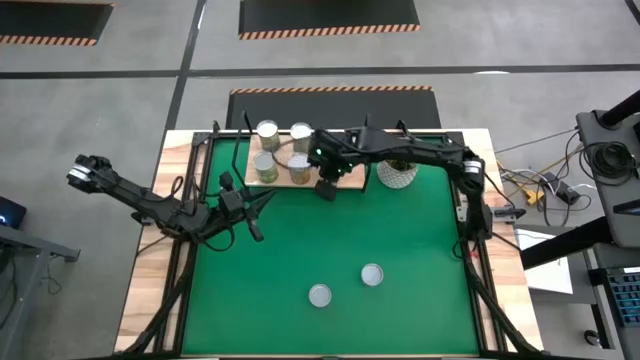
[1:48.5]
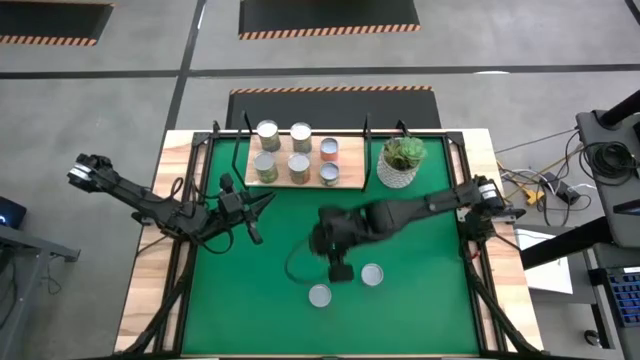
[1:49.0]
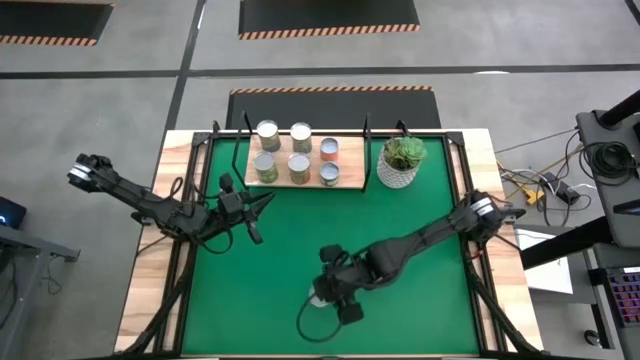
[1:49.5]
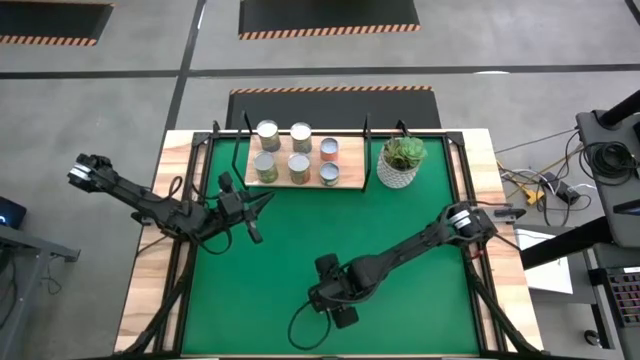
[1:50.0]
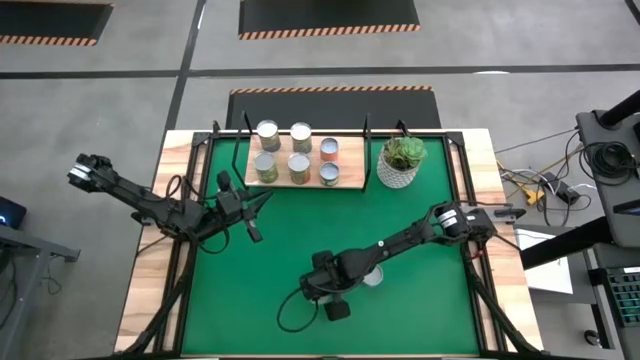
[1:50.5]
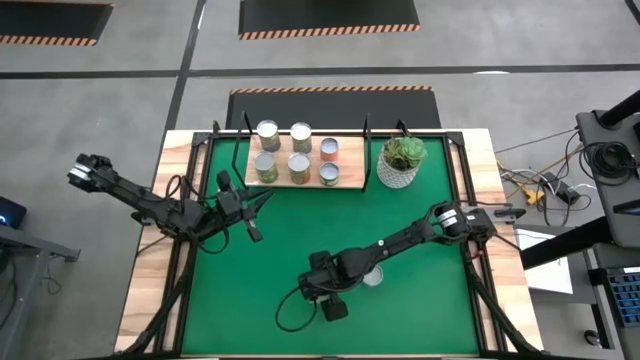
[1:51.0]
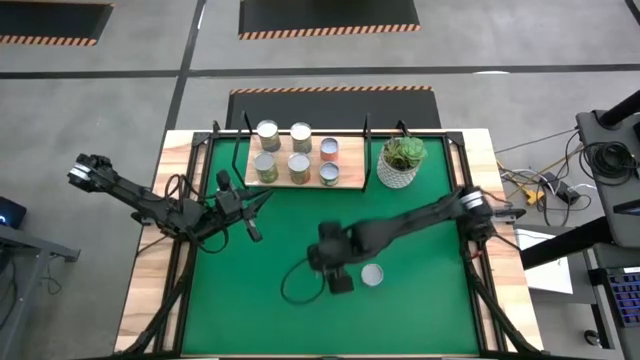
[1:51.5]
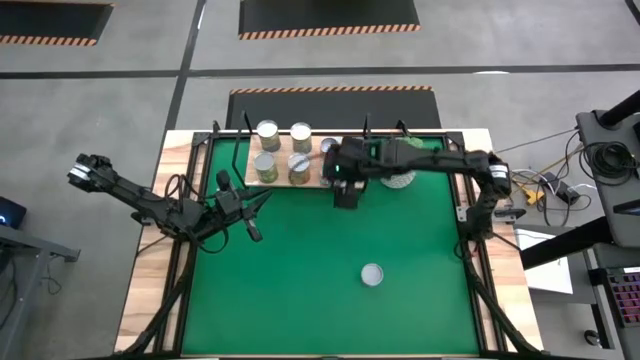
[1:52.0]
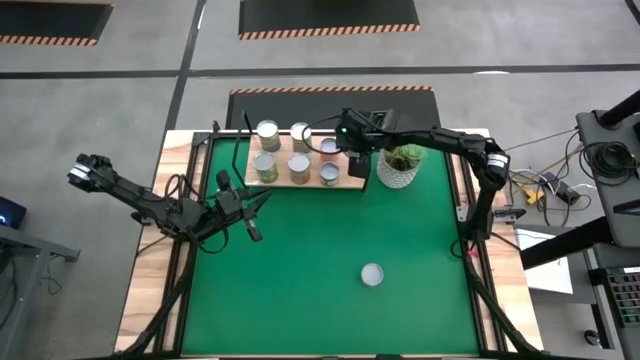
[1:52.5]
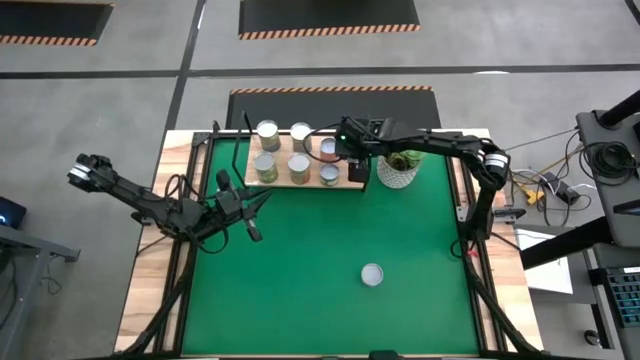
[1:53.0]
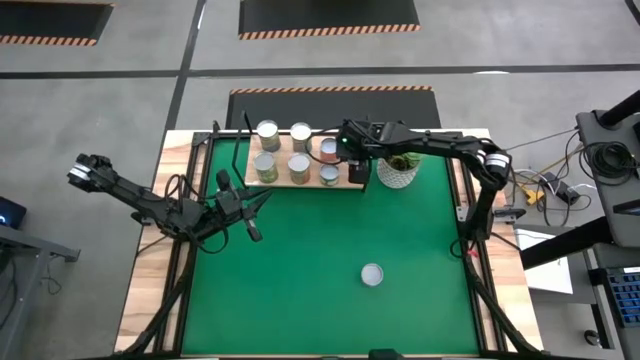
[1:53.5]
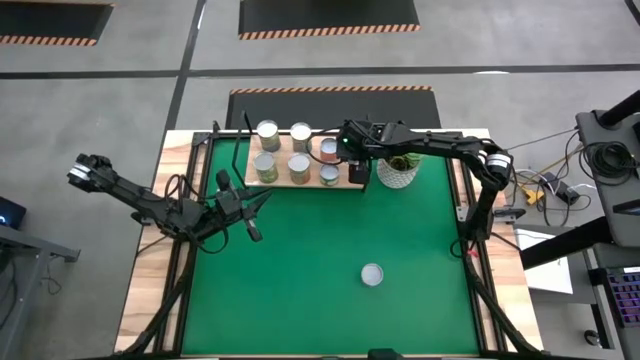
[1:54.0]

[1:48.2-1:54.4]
Task: Pick and place cans onto a shelf
Put the canned tuna on the shelf

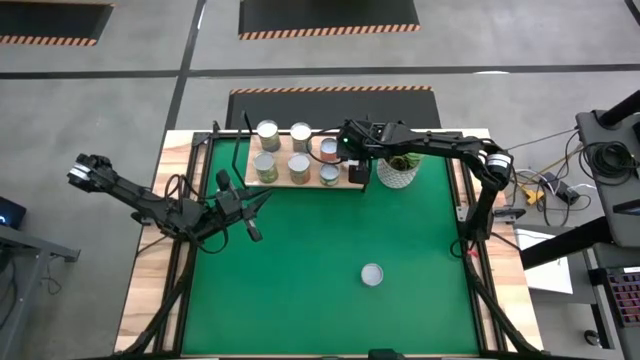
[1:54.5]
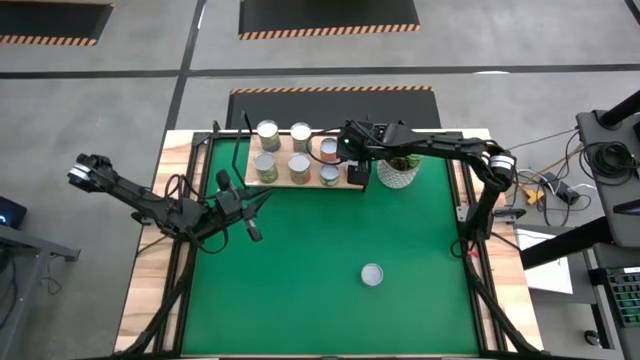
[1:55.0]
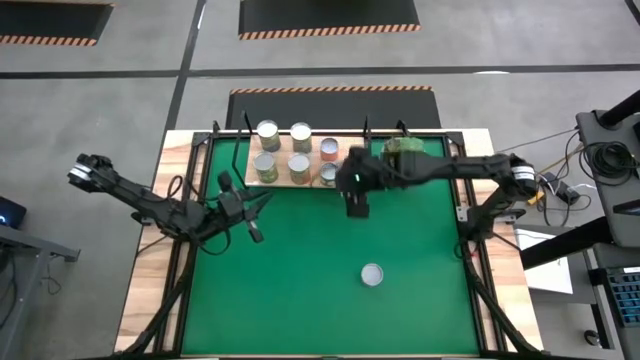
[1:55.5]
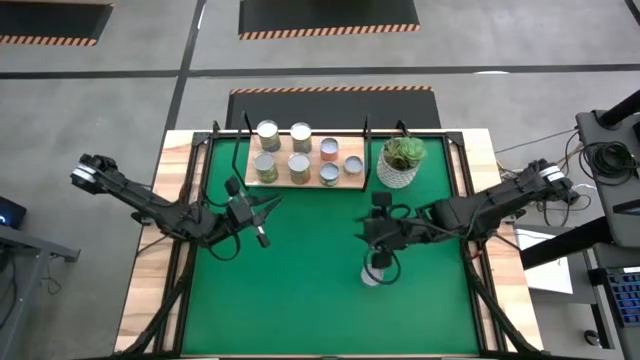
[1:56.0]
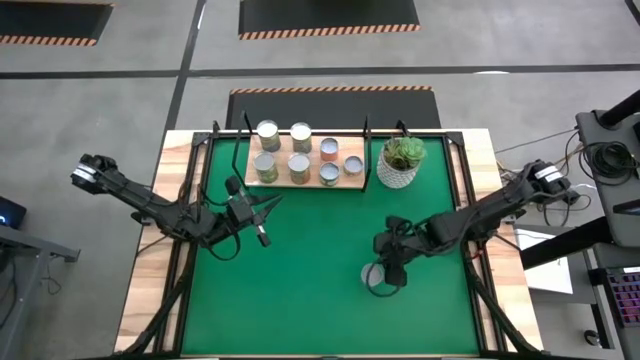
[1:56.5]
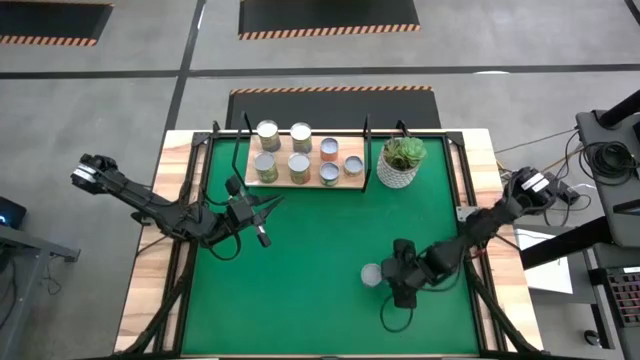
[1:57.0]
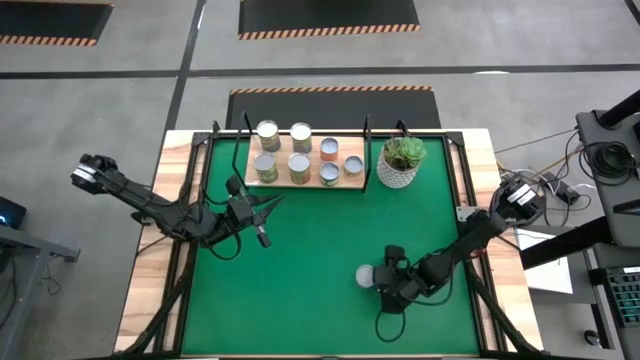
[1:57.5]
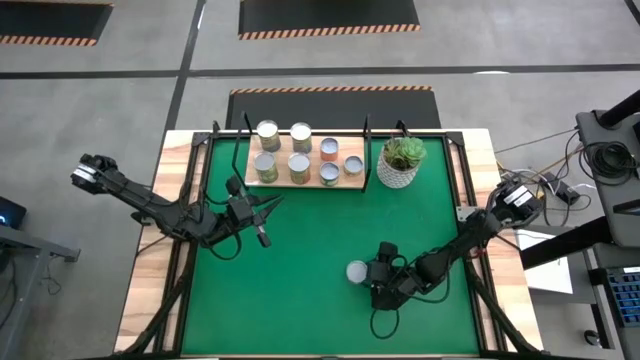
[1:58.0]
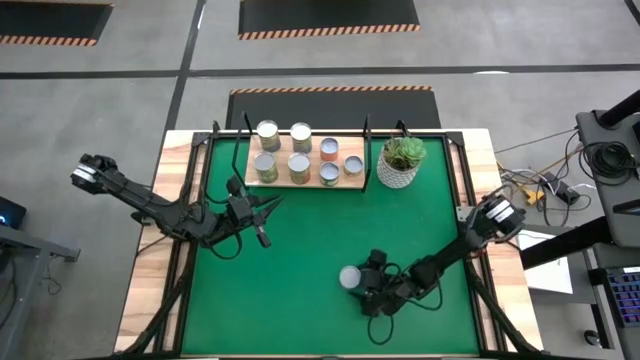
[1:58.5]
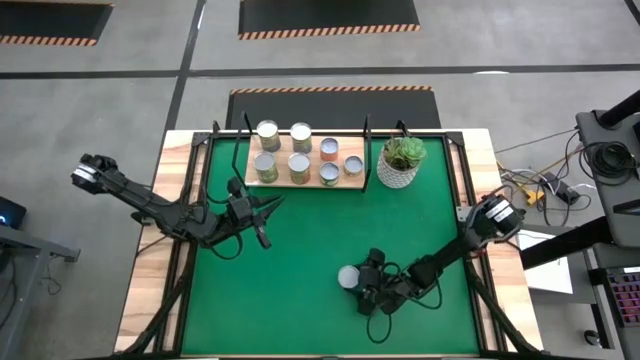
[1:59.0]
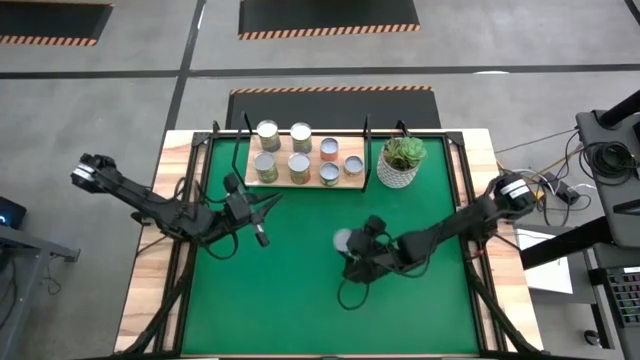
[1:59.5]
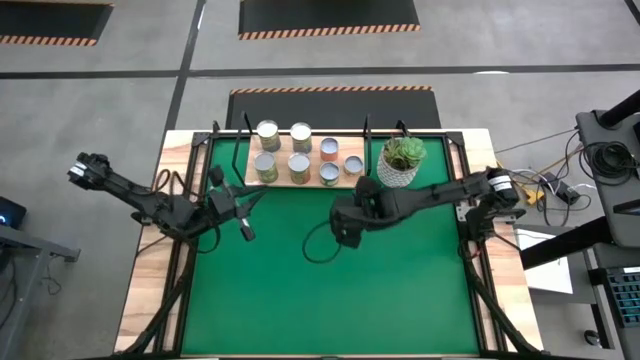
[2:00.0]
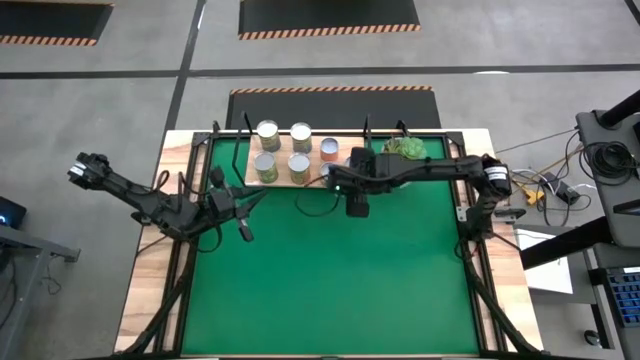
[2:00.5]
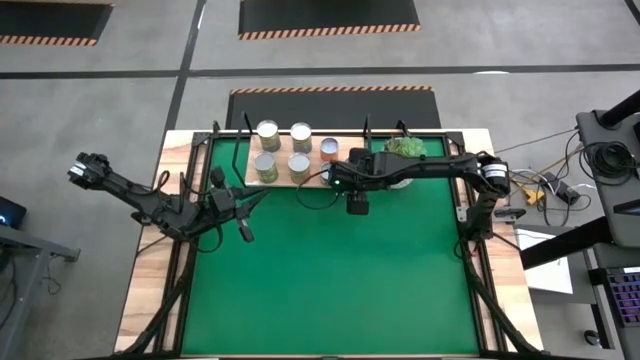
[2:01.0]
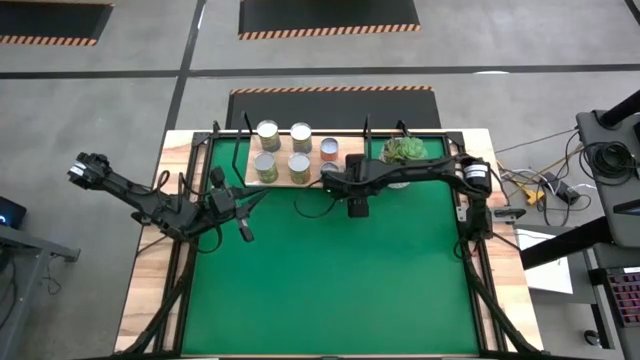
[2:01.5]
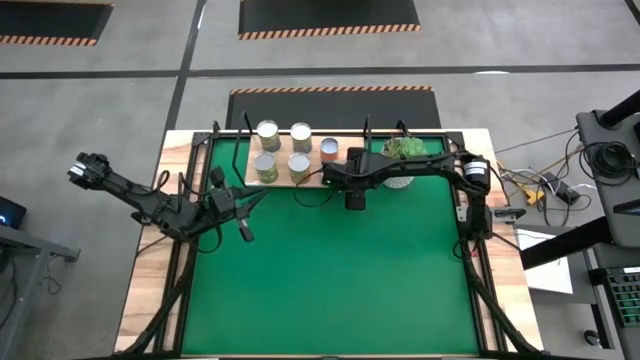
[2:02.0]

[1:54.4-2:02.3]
Put the canned salmon on the shelf

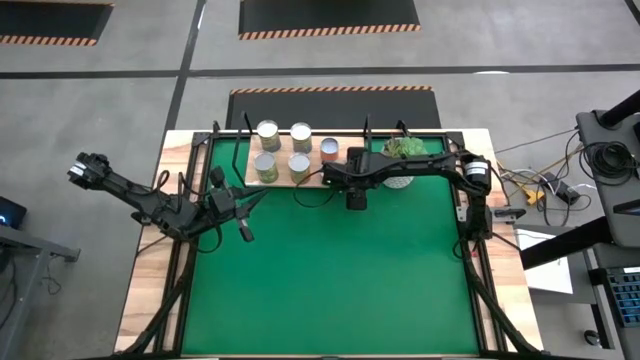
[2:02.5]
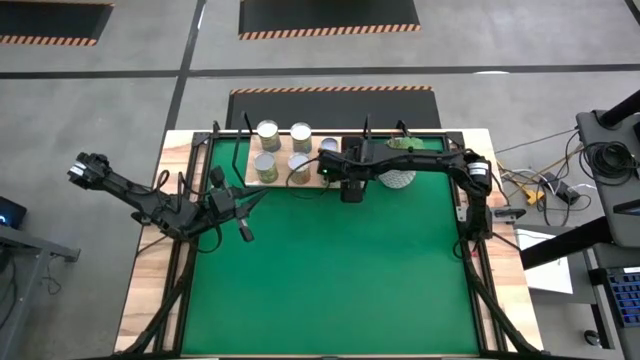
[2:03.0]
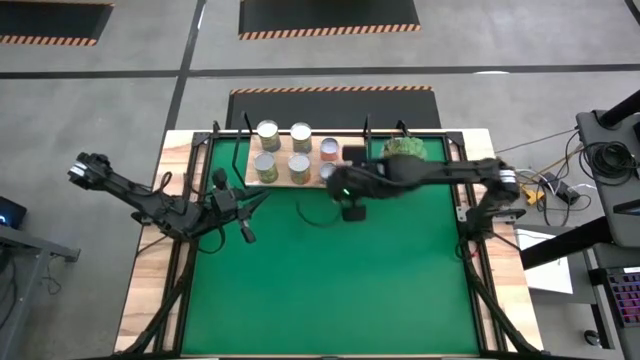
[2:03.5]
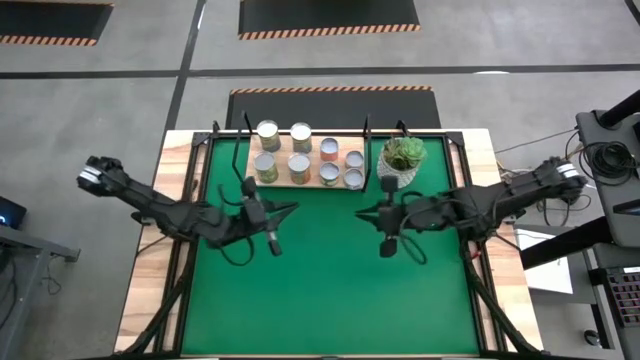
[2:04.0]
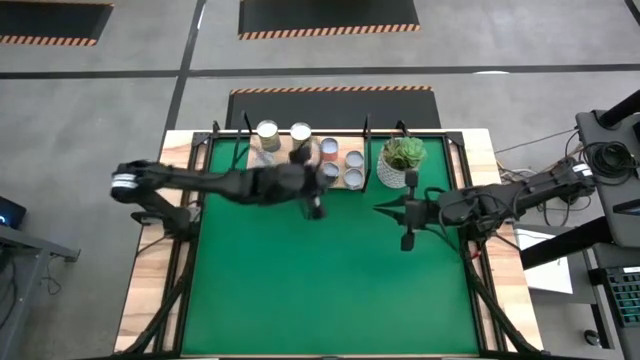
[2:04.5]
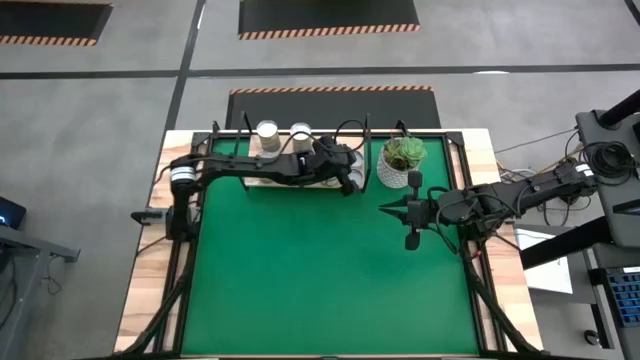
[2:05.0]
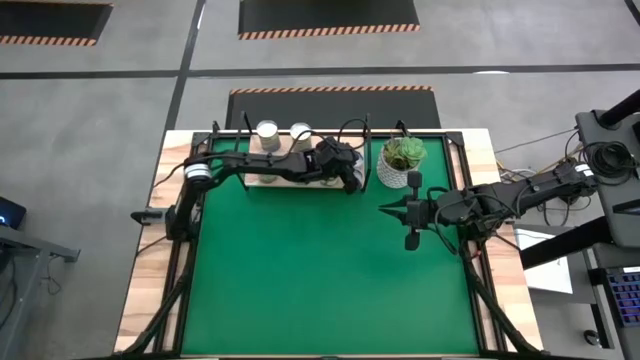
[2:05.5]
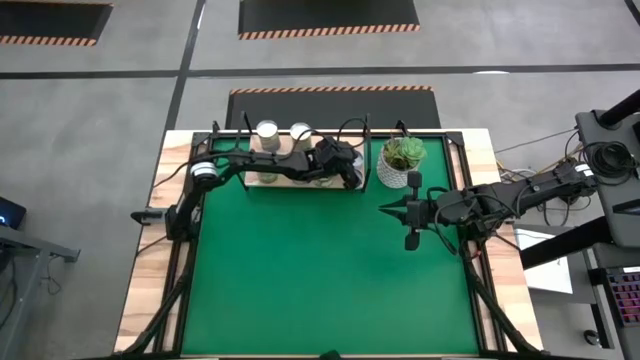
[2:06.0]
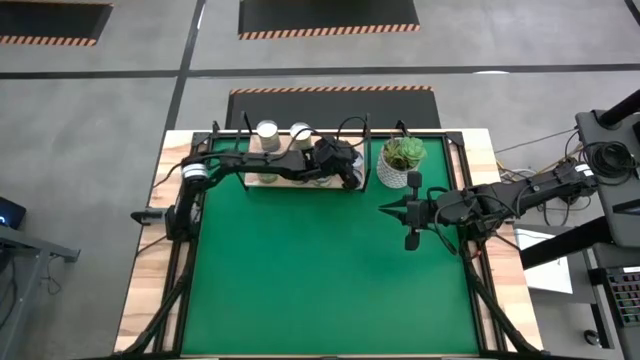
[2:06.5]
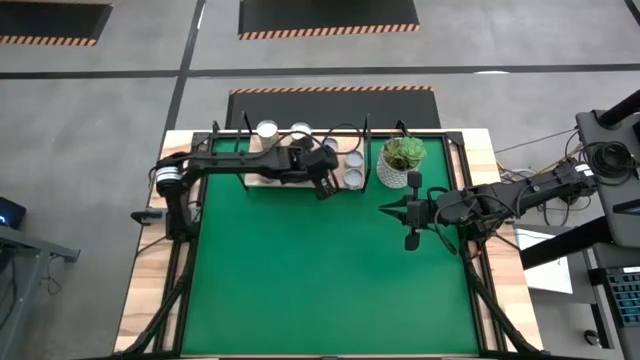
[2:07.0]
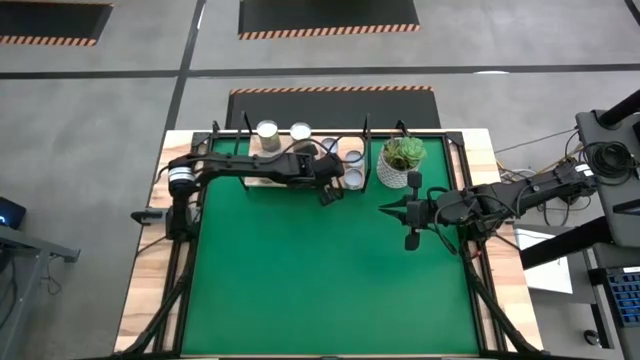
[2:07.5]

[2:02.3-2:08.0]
Adjust the cans on the shelf

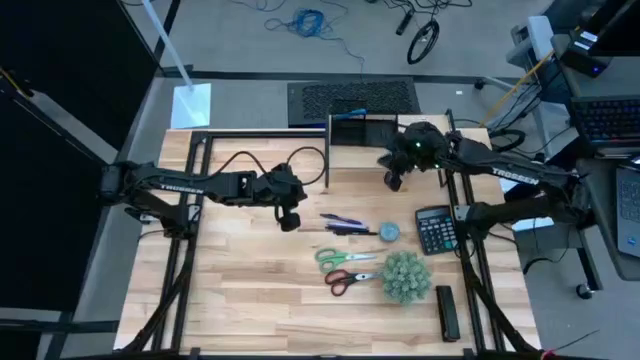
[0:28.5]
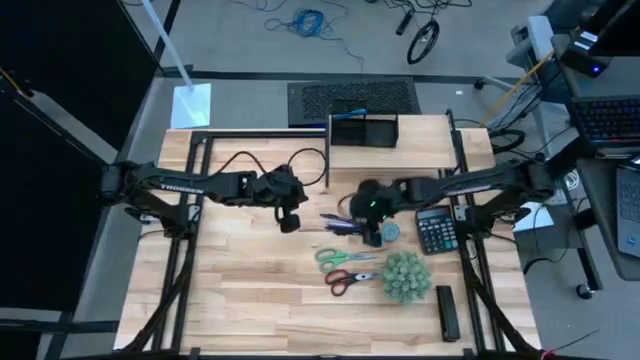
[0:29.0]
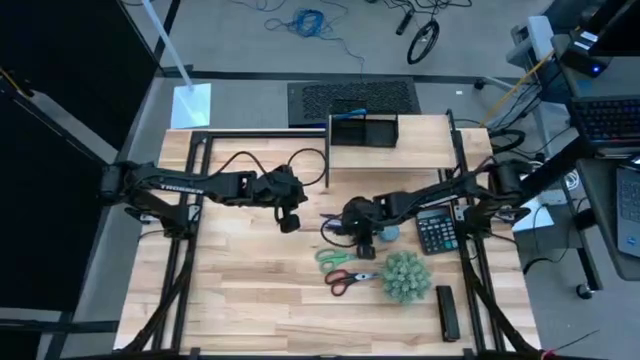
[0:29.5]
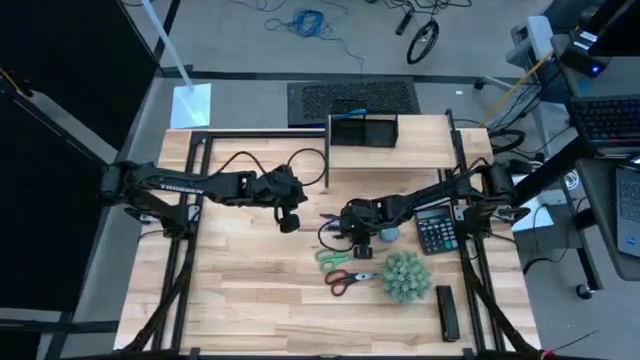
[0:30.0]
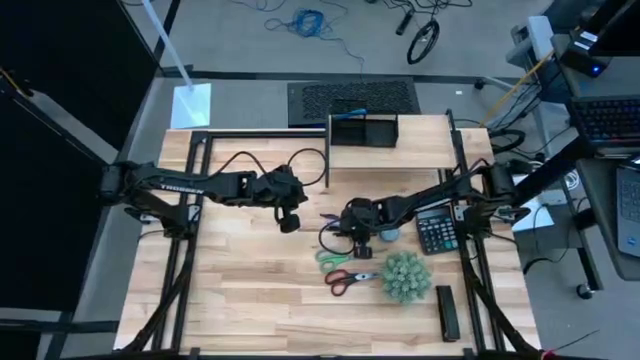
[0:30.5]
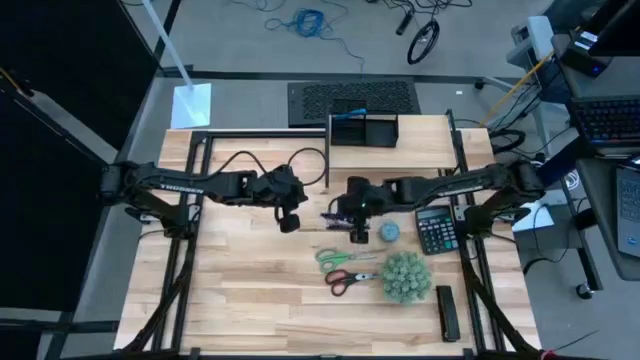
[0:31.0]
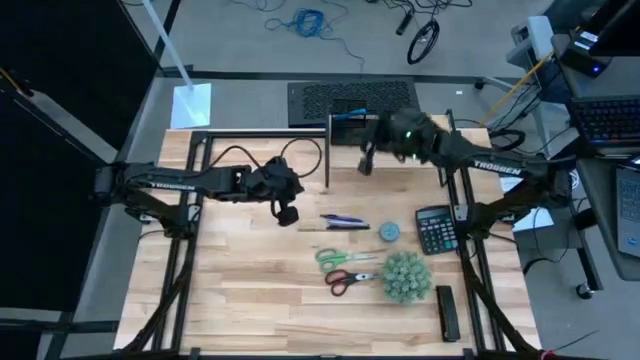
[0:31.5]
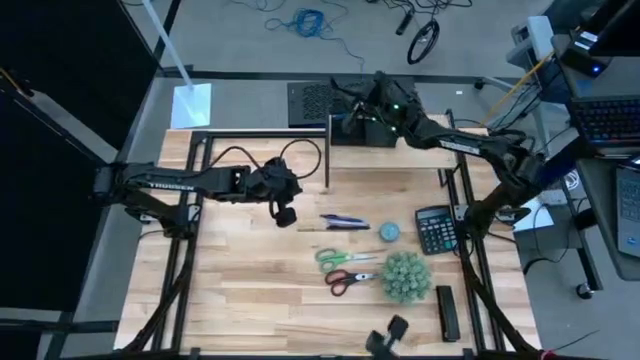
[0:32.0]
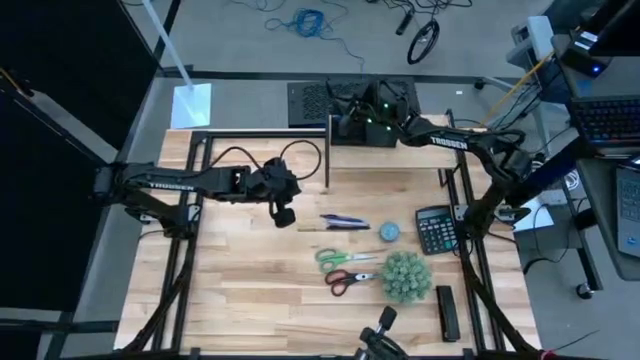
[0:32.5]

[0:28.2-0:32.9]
Task: Pick and place office supplies into organizer
Put the black pen into the black desk organizer on the shelf
